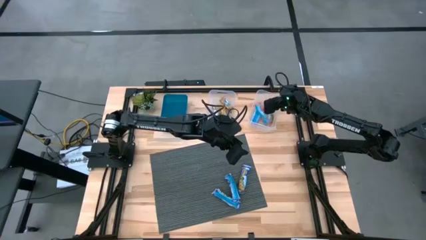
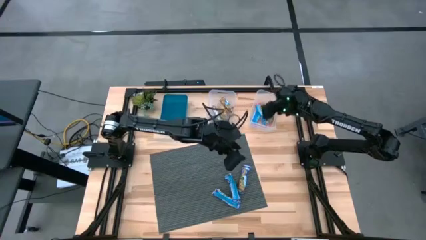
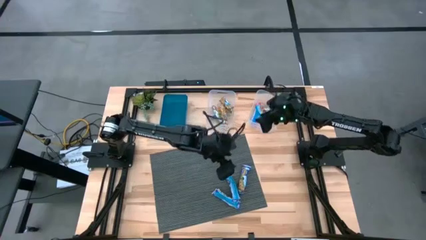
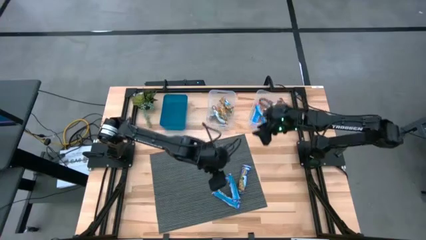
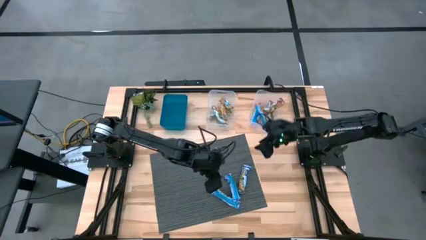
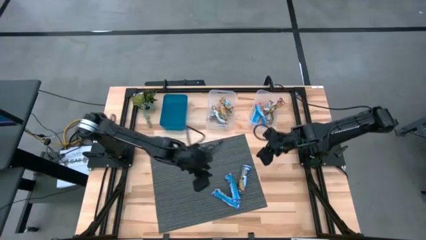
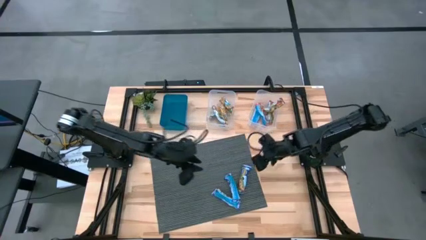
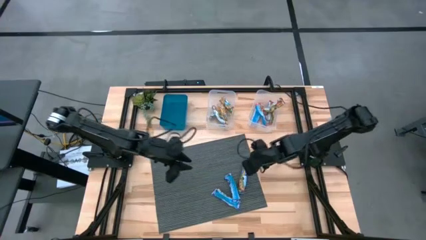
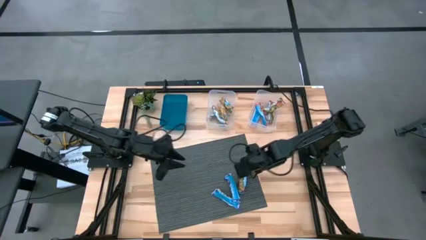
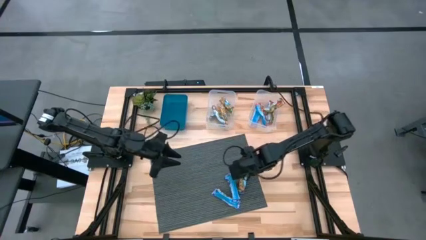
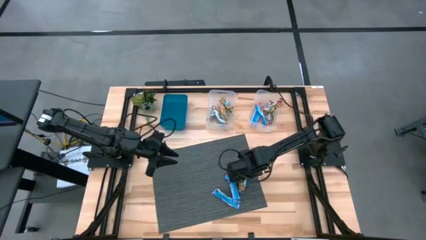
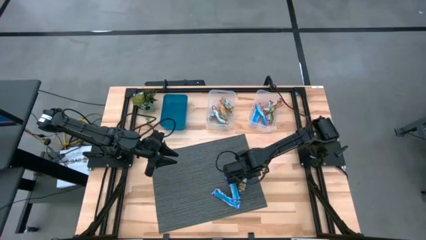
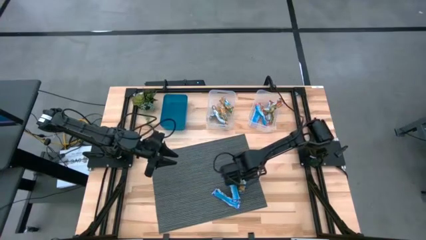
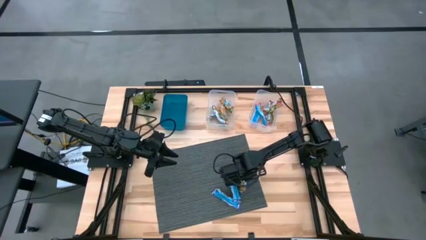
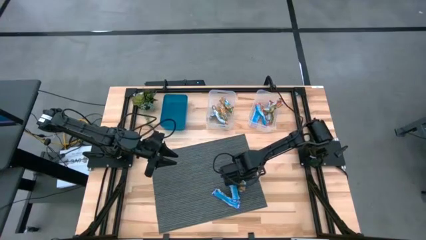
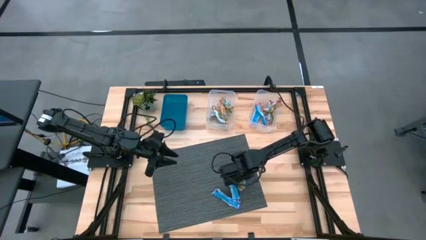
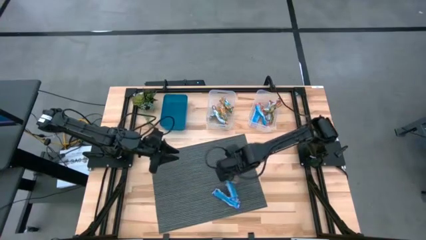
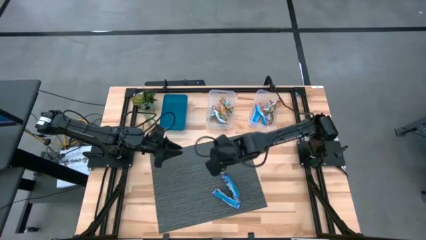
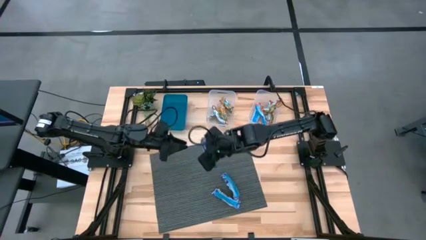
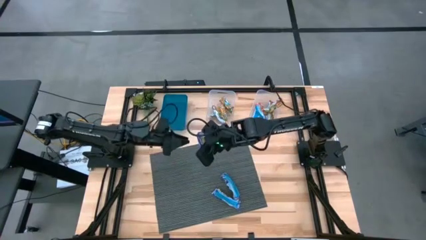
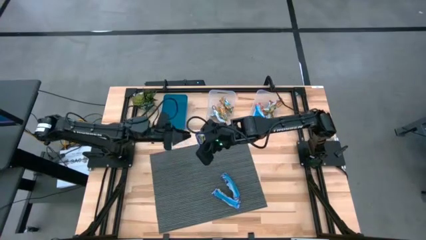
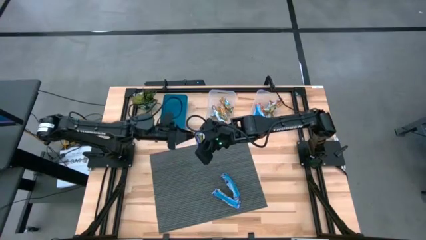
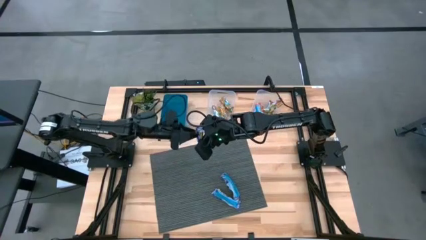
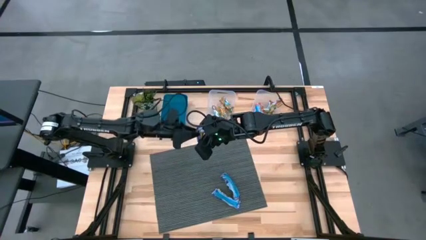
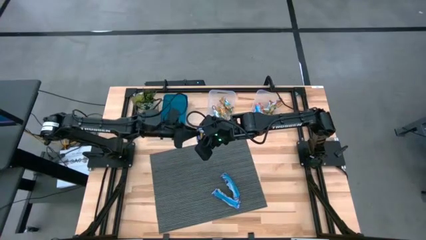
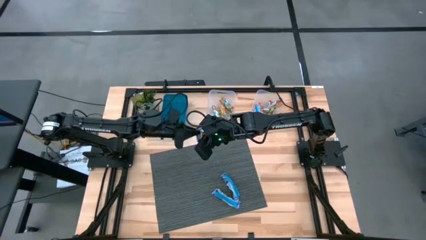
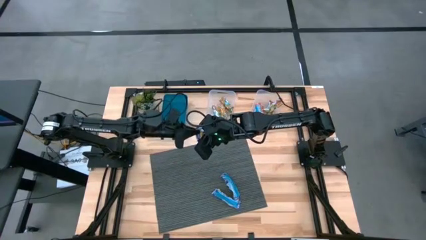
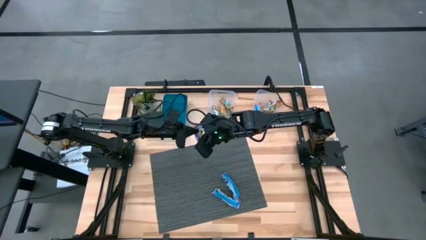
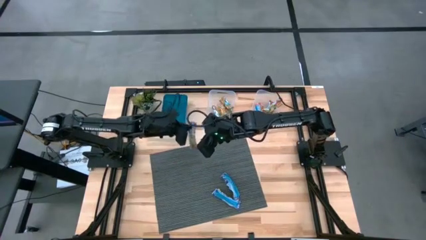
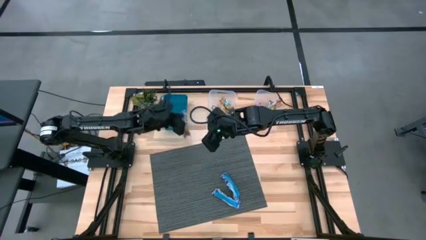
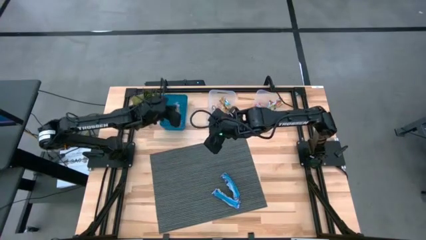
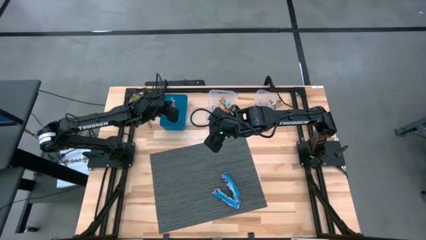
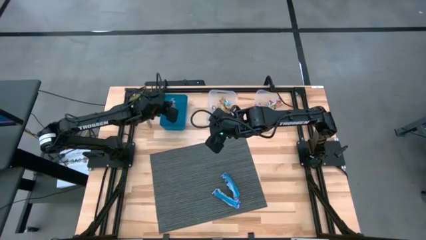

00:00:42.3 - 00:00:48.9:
Task: Pick and place Granola Bars by type
Put the blue granola bar into the blue bin

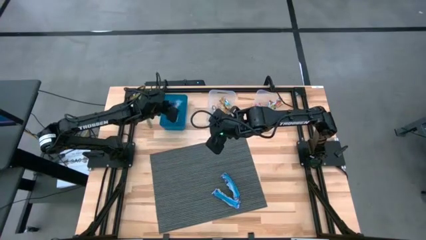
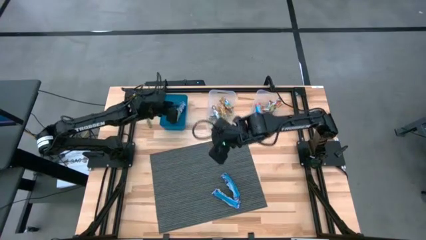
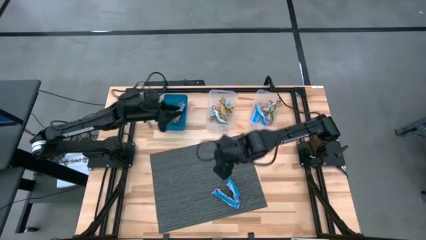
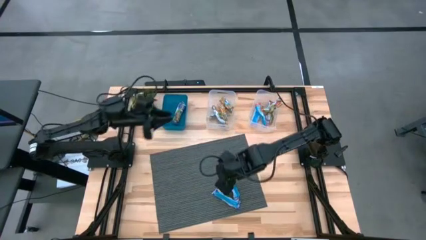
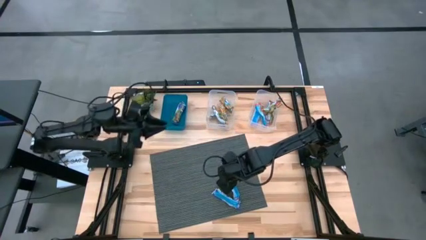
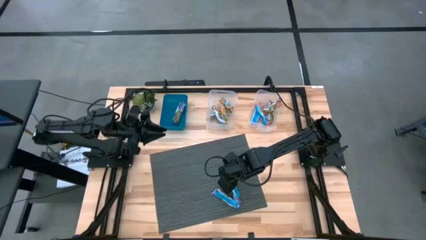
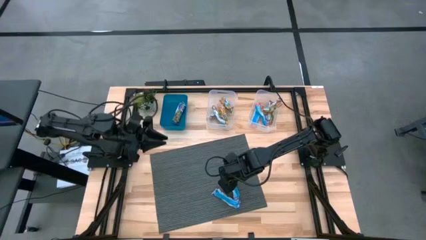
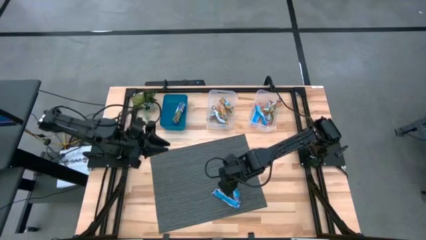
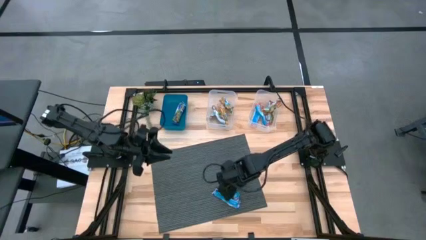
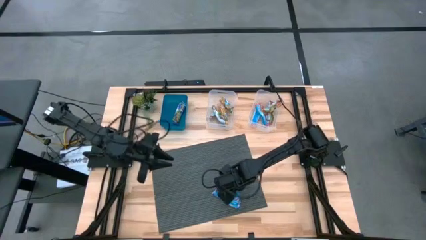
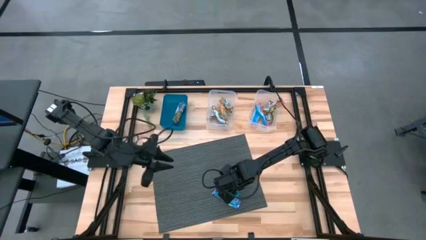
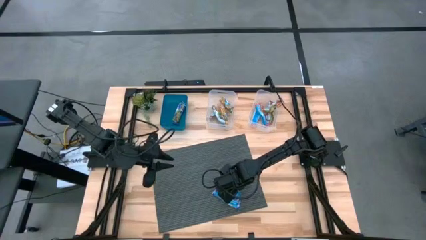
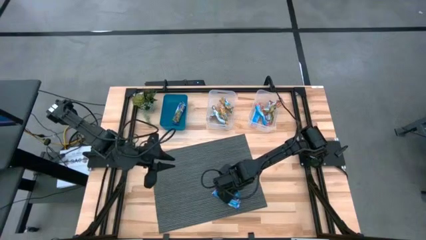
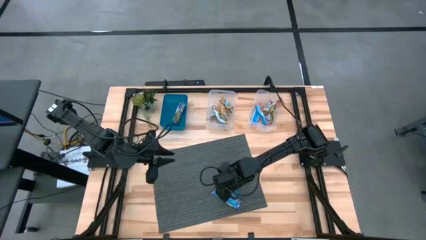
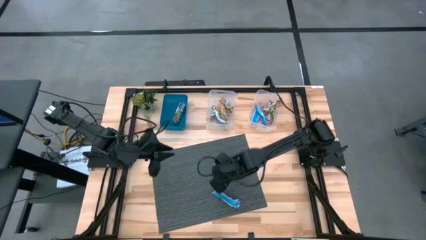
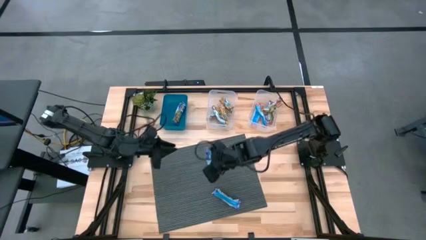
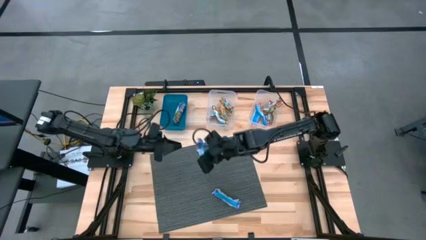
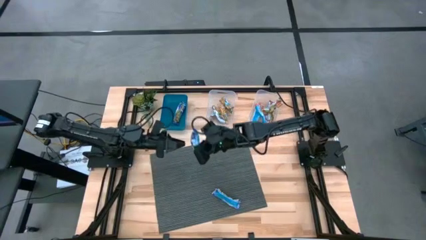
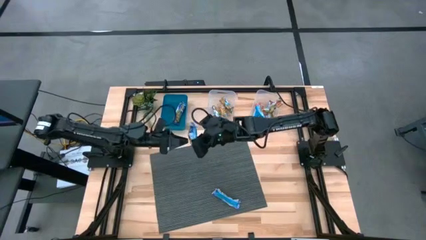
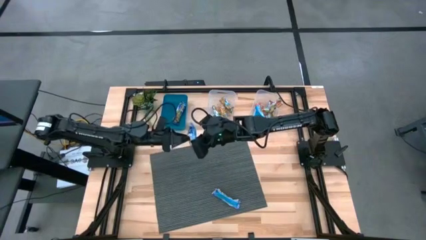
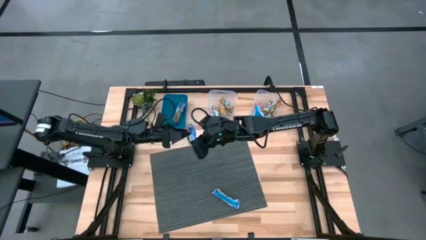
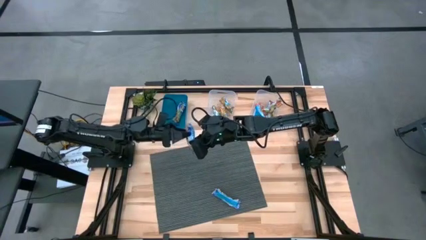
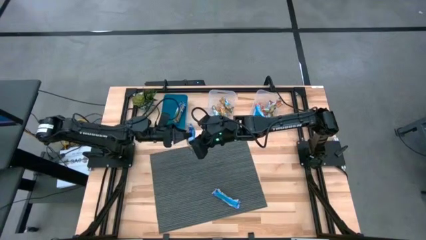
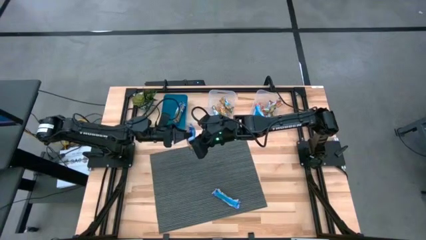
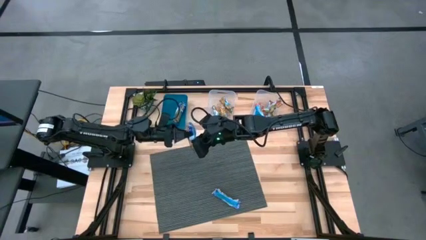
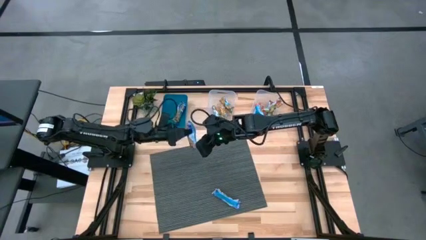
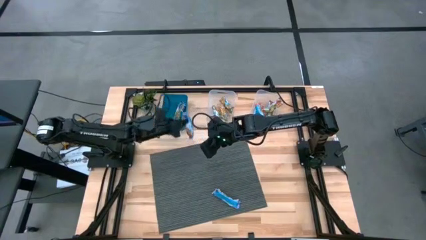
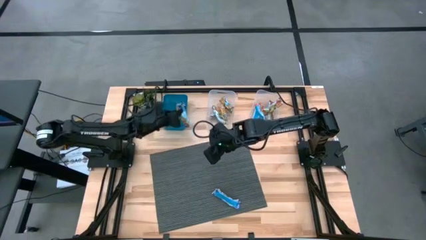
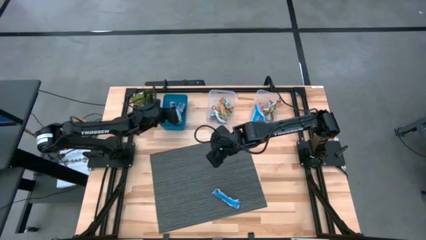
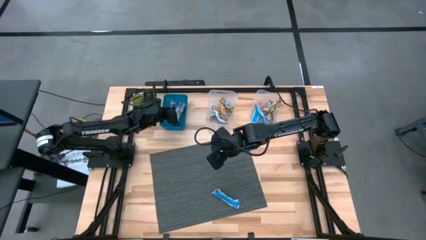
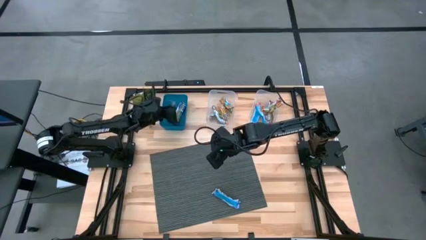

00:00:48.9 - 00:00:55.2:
Put the blue granola bar into the blue bin

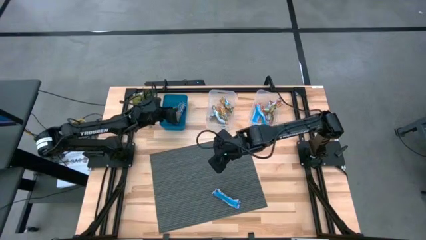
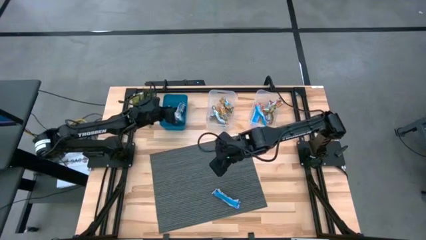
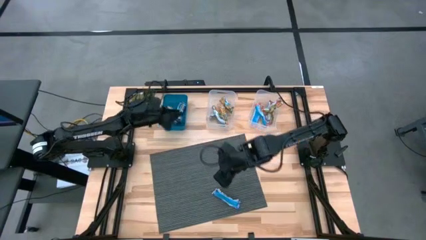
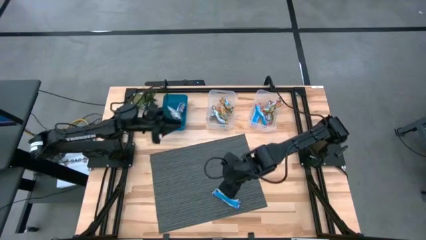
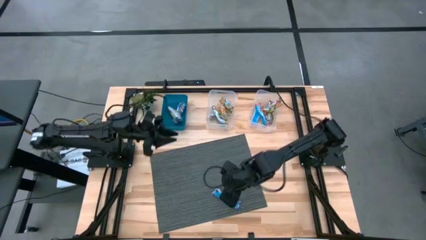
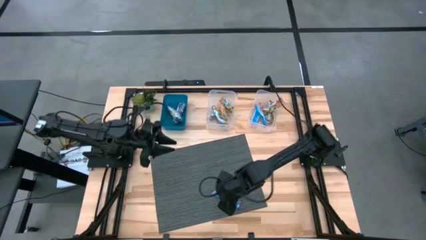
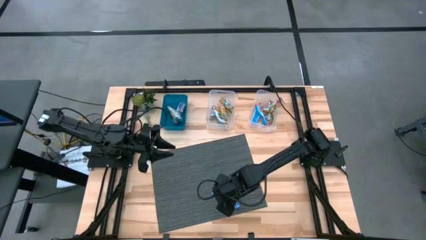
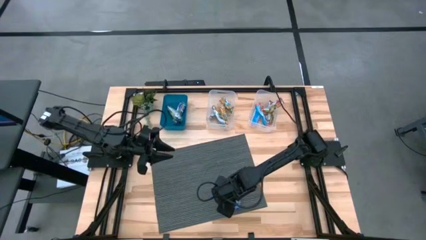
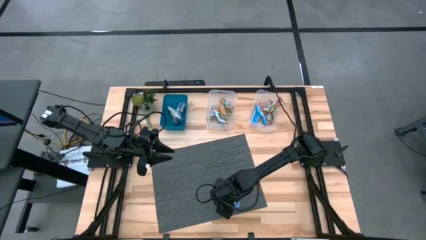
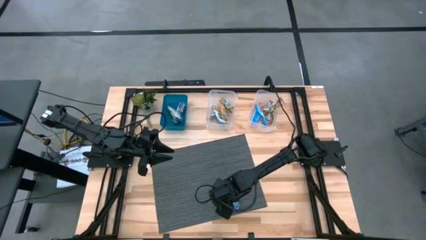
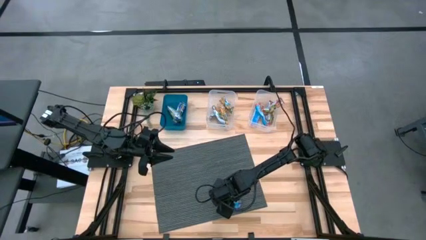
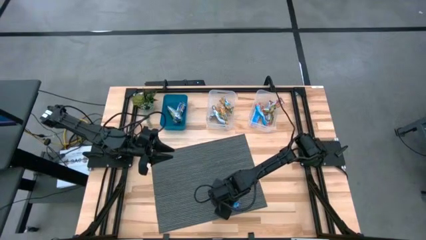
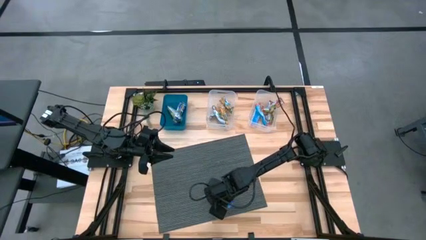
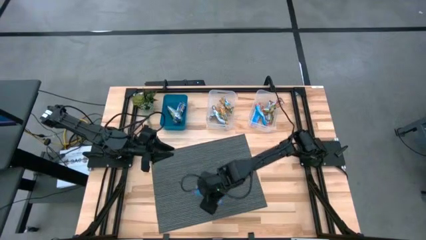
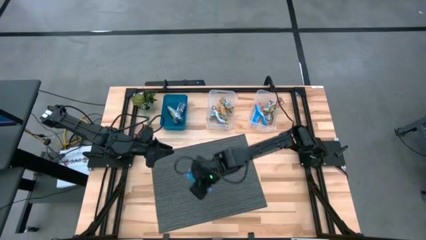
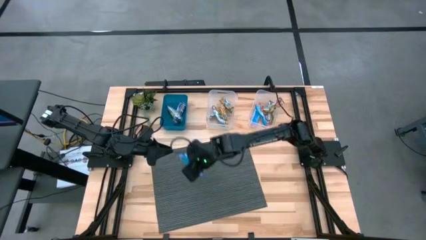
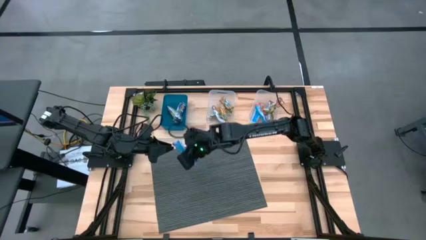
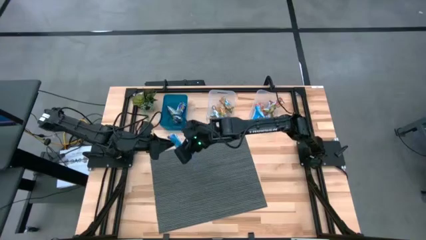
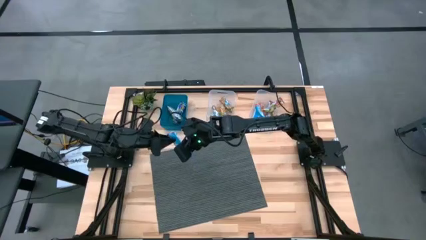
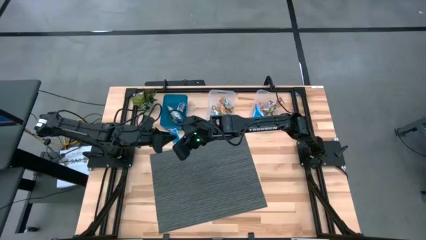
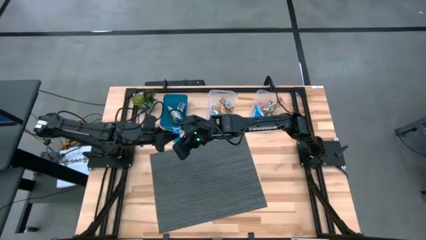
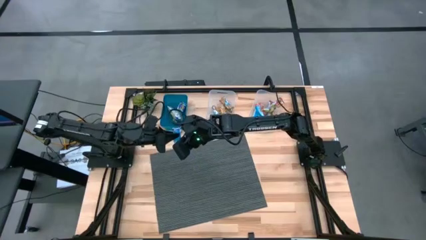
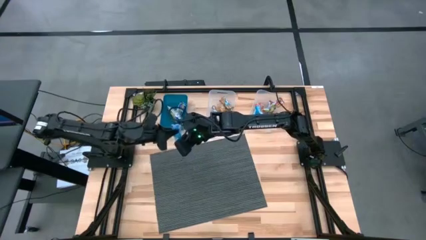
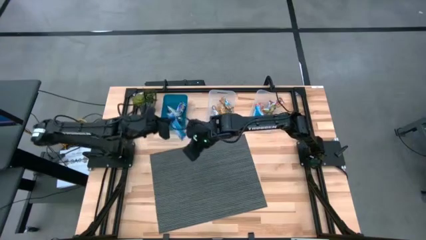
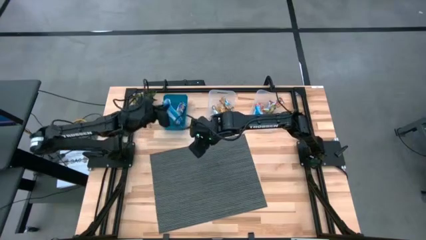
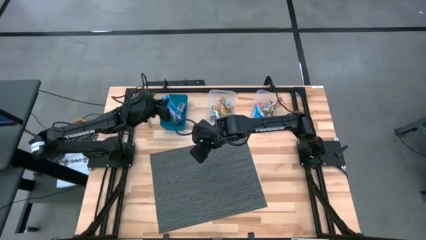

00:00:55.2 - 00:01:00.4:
Put the blue granola bar into the blue bin
